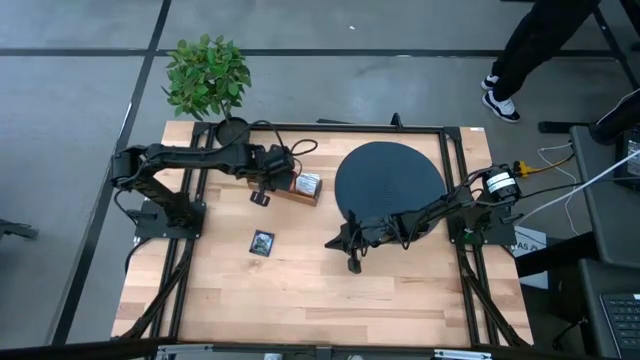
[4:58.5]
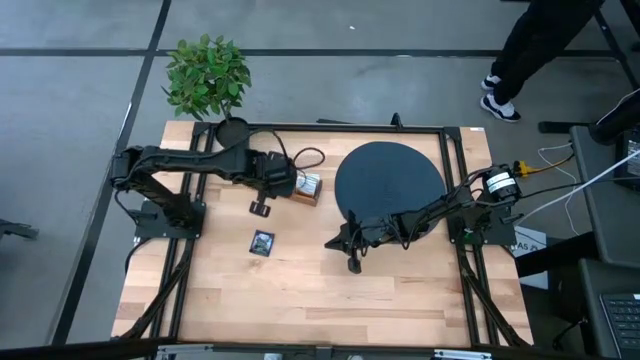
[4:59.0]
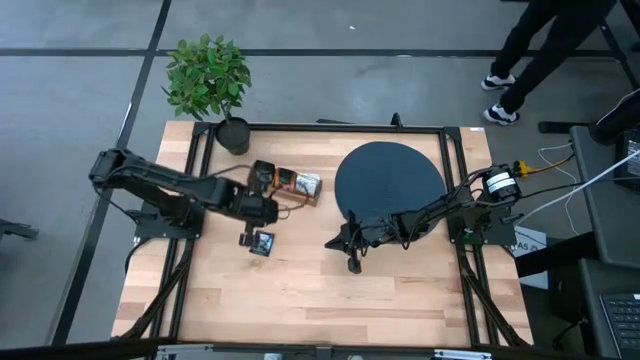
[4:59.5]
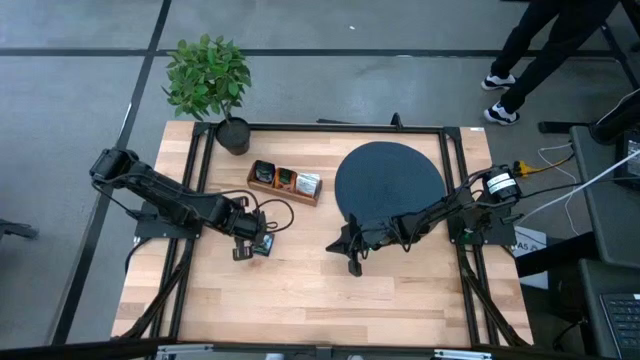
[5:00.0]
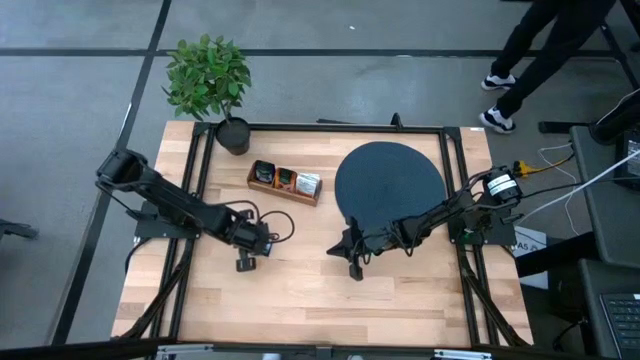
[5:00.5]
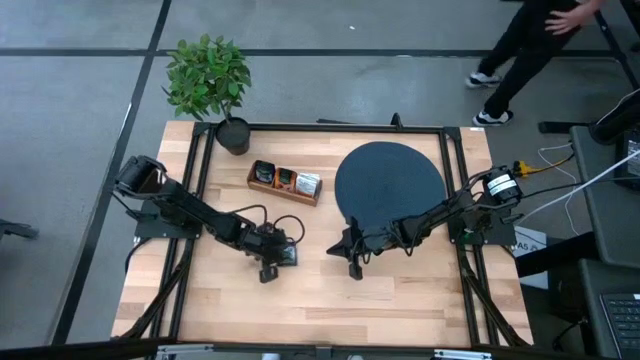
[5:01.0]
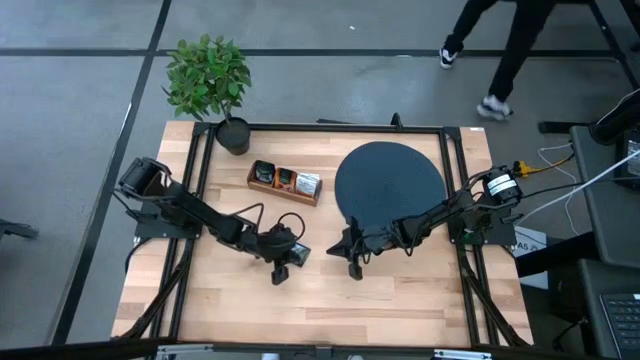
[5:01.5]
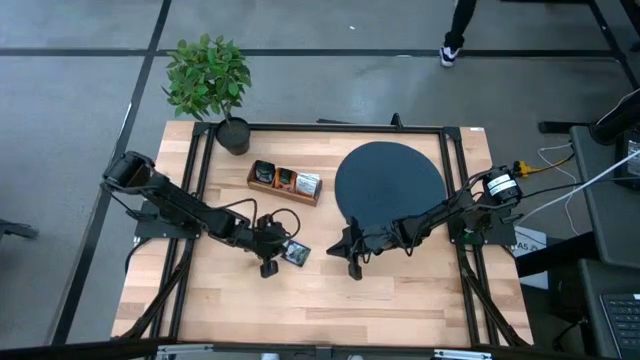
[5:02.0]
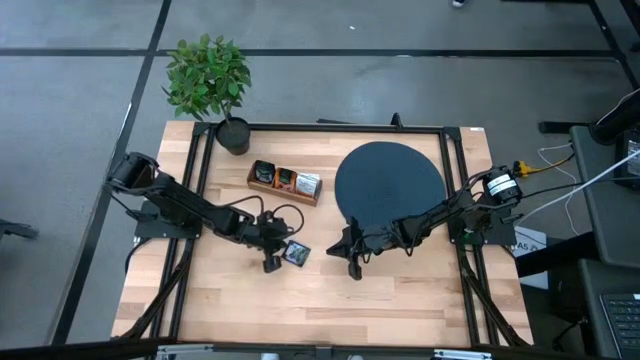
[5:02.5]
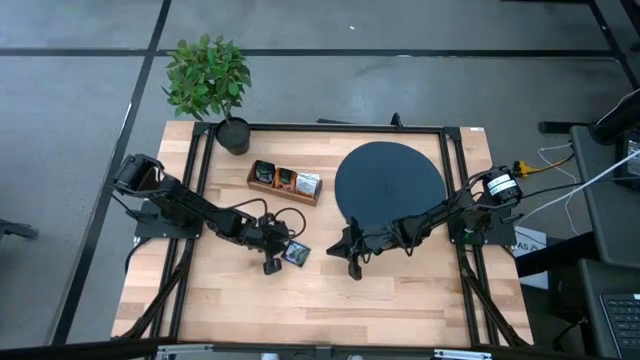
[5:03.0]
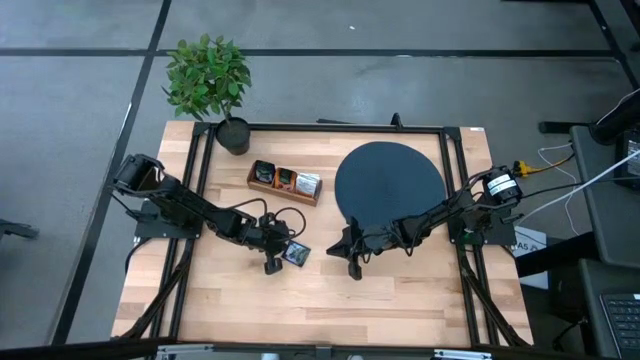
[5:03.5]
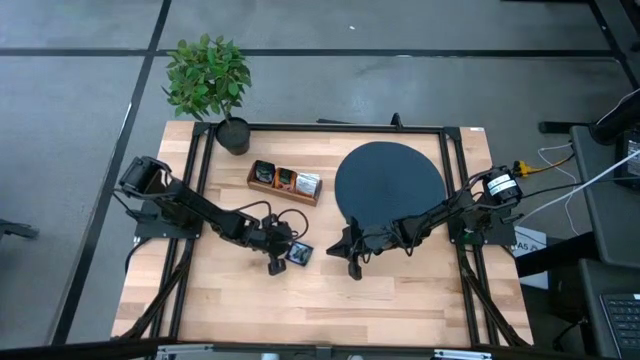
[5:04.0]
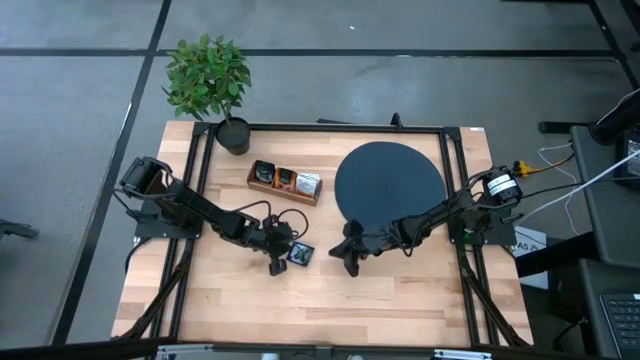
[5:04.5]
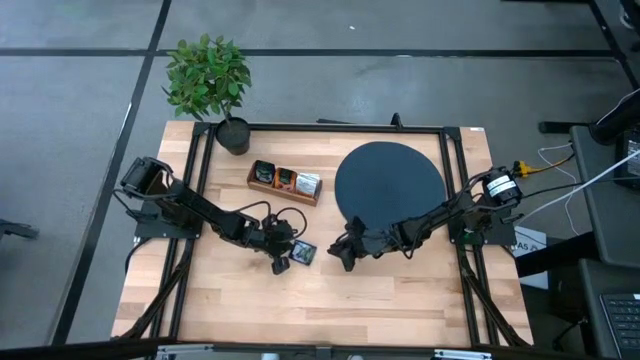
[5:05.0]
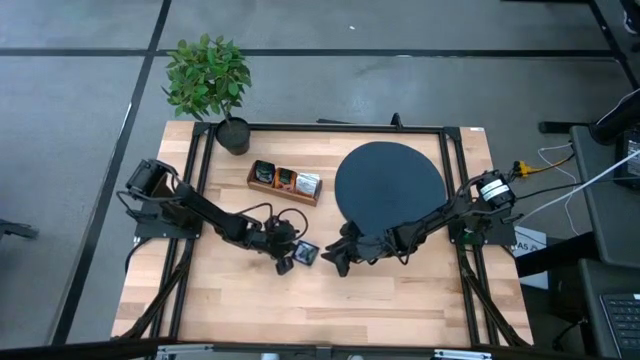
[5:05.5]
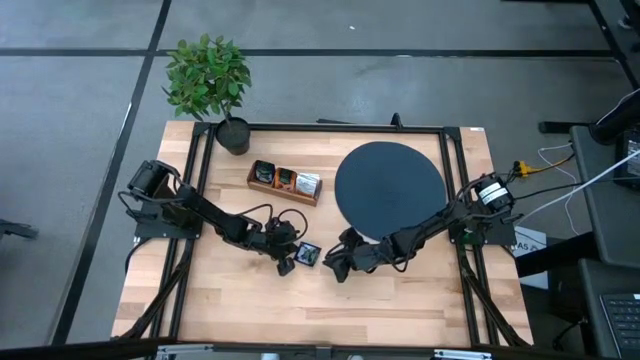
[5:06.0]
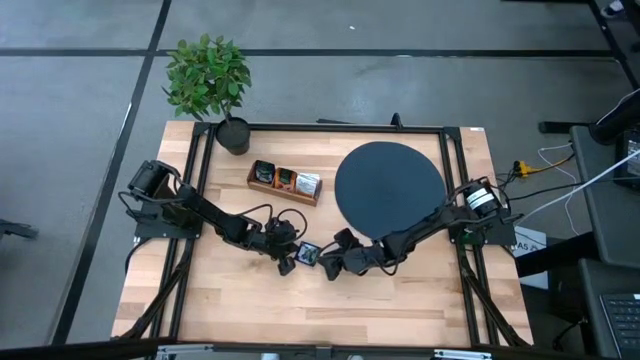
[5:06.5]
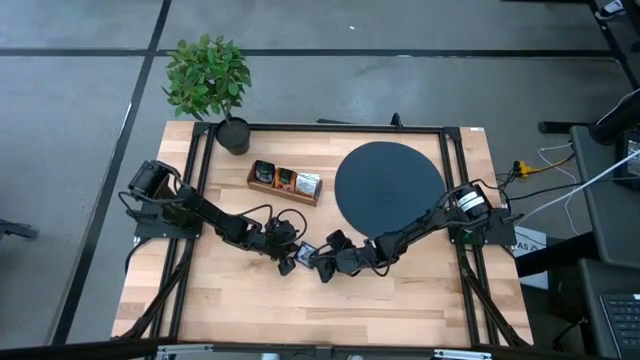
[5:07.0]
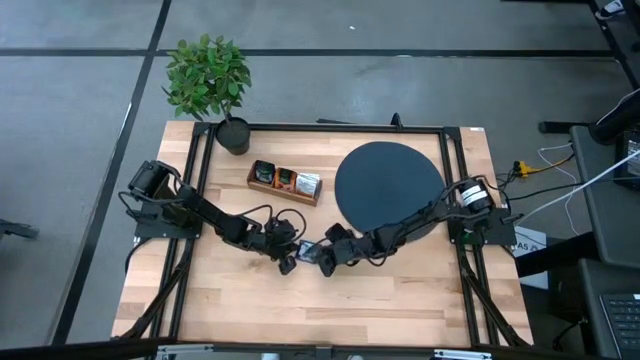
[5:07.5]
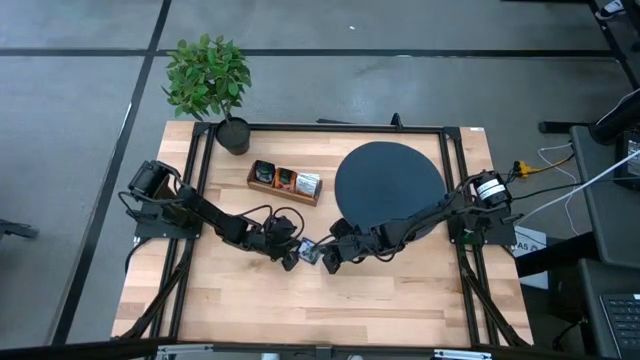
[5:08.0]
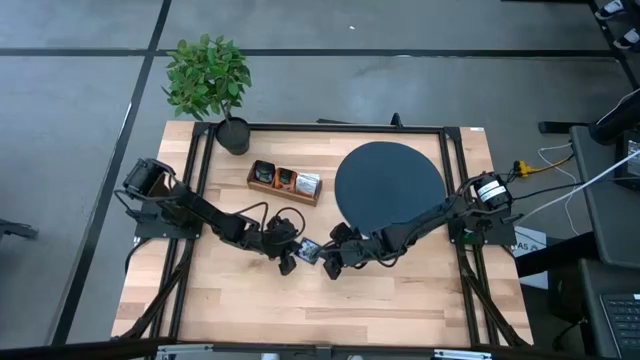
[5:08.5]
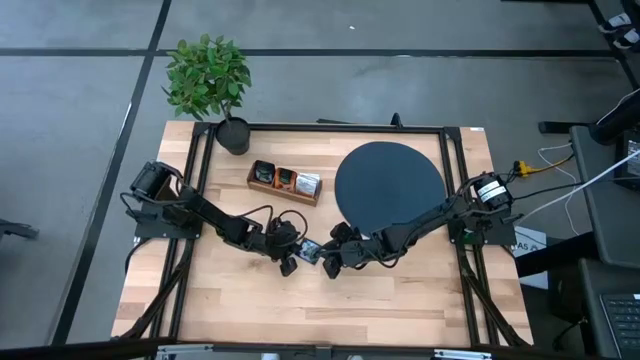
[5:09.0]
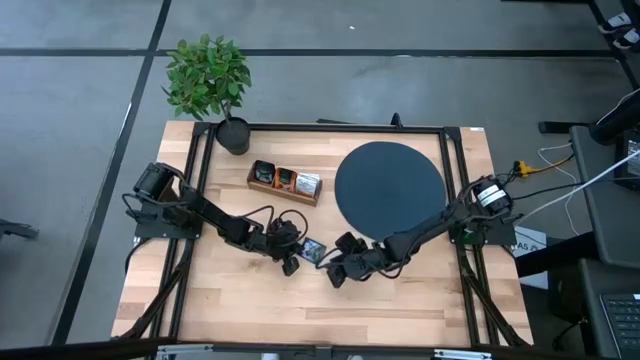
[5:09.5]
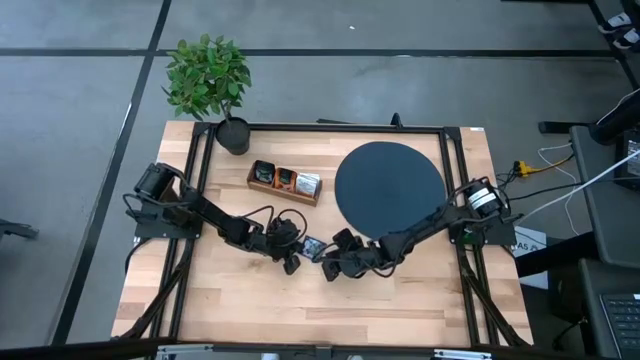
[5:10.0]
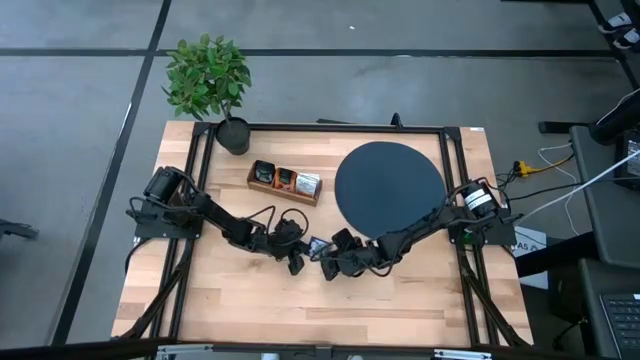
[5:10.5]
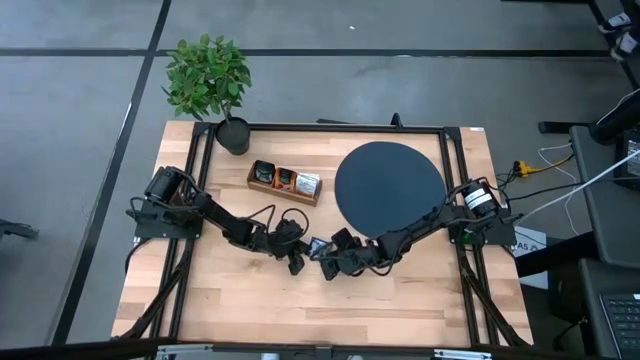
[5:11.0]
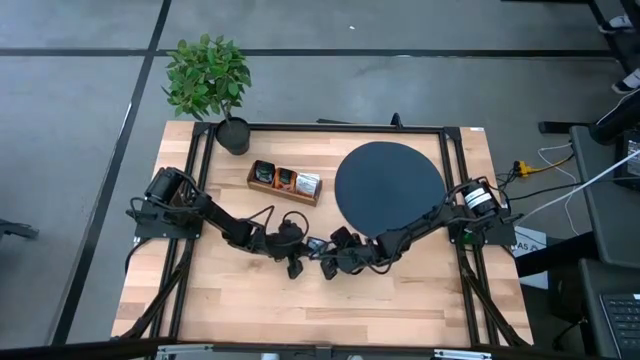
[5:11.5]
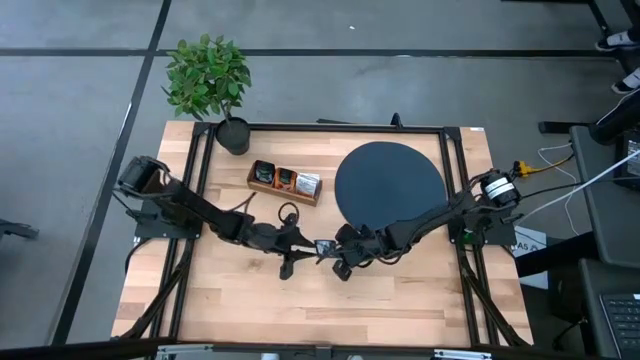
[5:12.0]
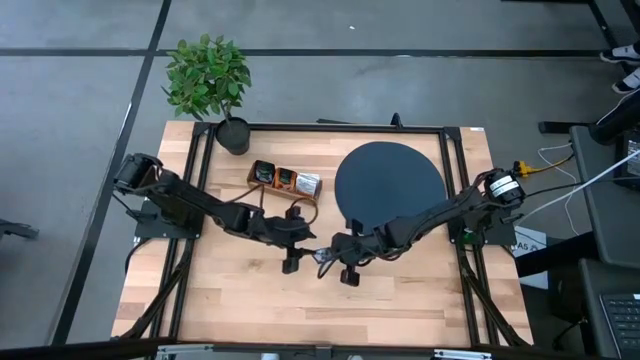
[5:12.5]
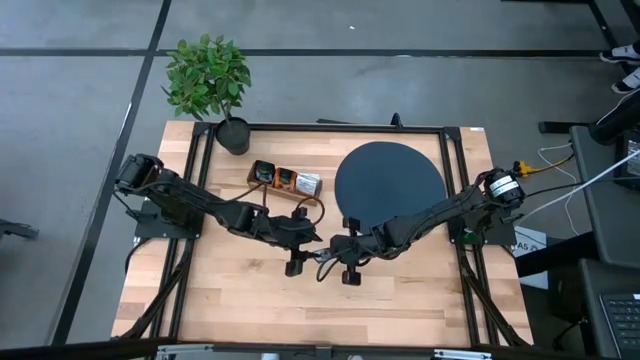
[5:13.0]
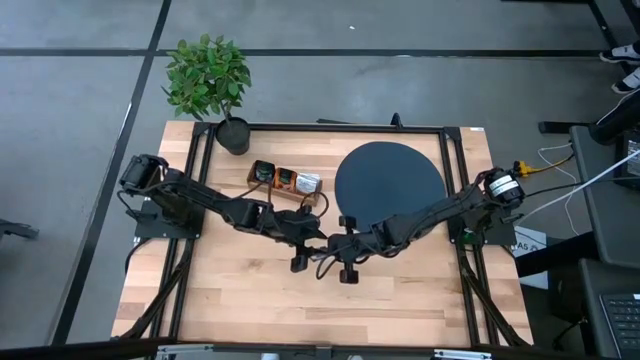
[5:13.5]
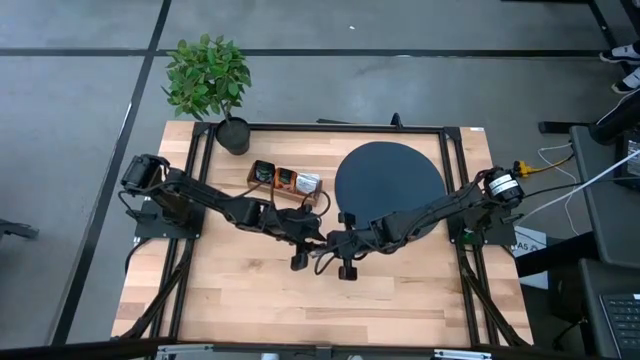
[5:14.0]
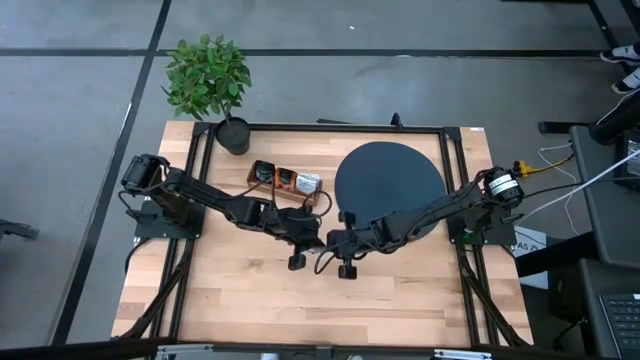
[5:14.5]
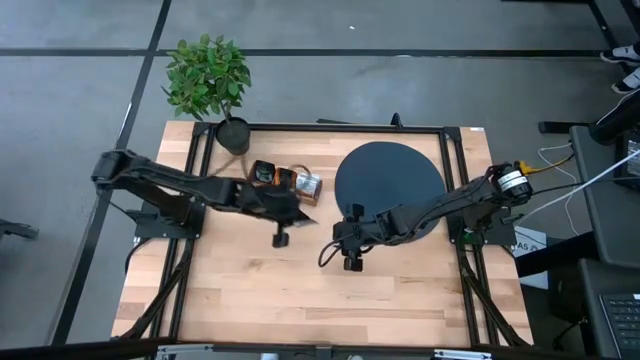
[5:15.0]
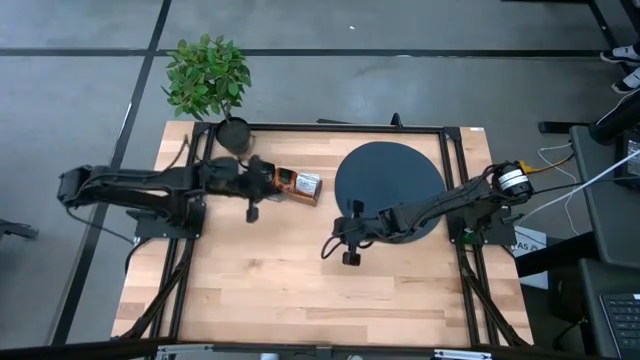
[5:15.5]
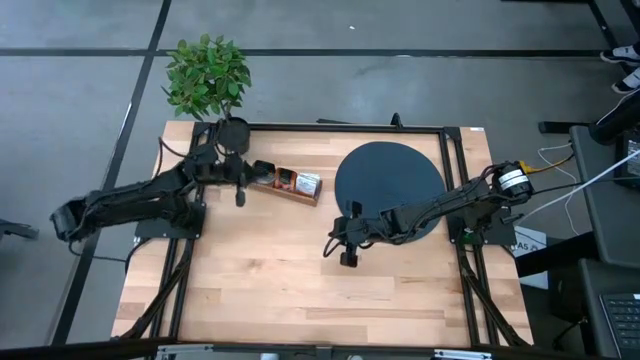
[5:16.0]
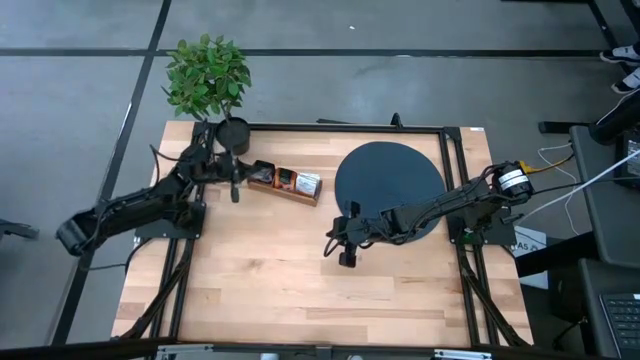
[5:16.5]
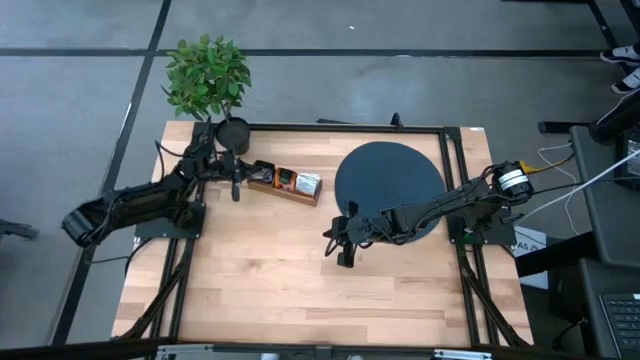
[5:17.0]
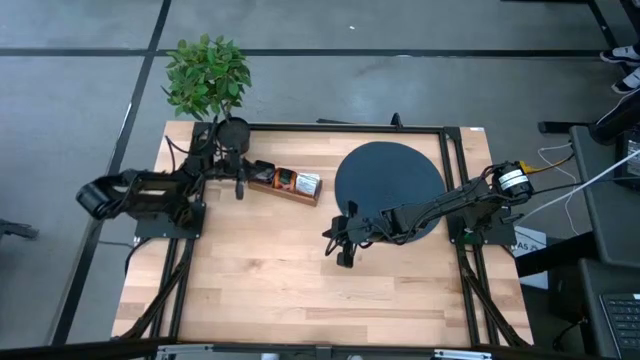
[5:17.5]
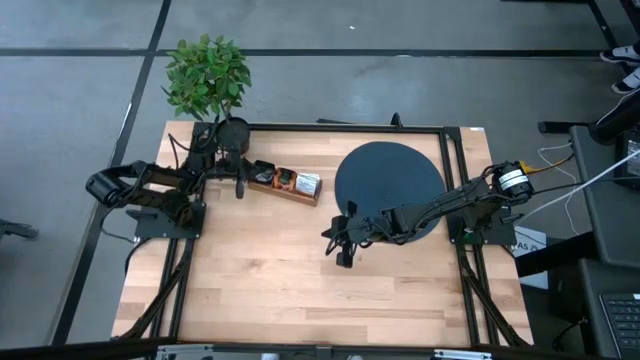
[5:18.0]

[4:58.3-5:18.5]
Task: Pick & Place Tea
Put the dark blue tea bag into the left section of the wooden organizer

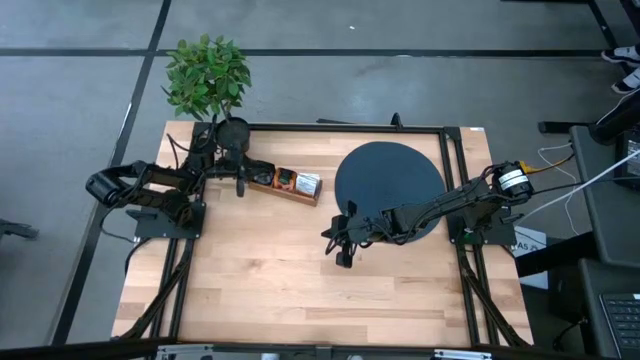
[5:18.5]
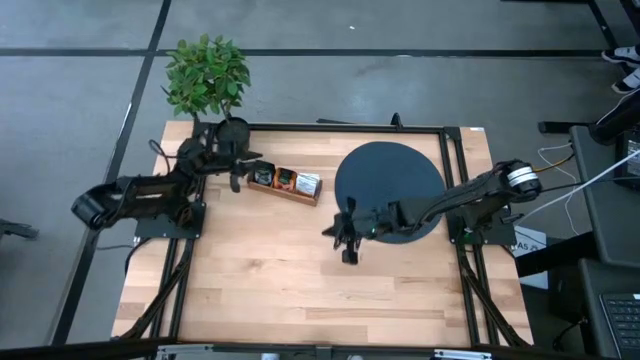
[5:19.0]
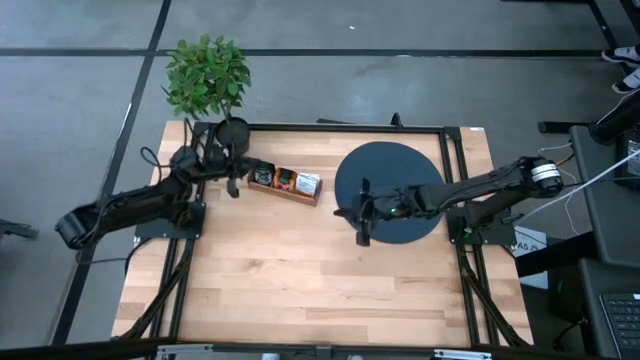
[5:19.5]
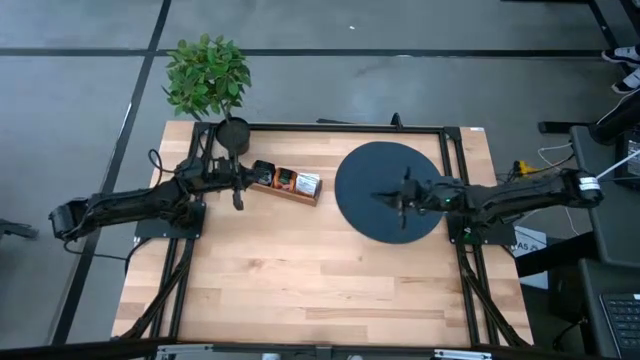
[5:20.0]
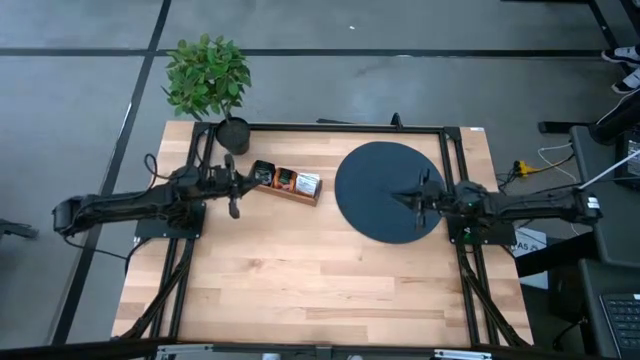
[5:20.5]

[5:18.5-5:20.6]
Return to Home Position
